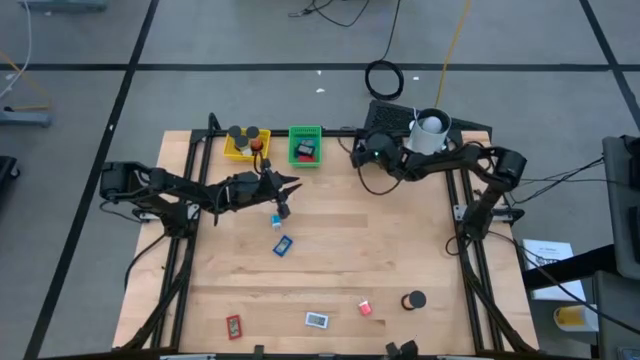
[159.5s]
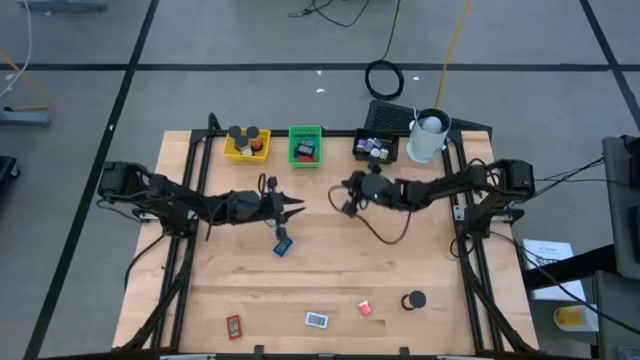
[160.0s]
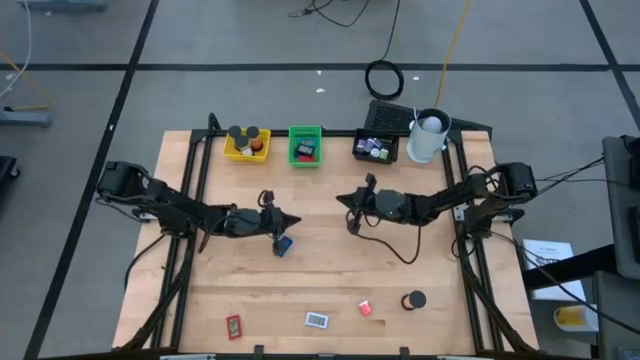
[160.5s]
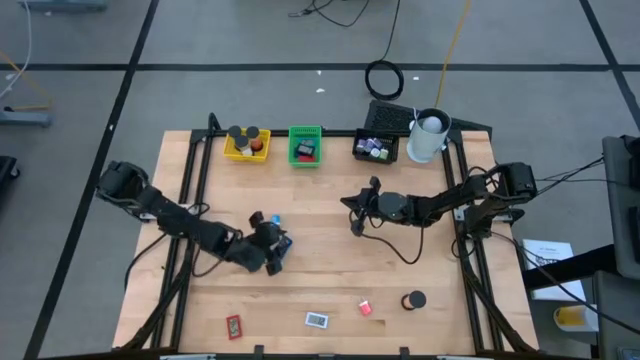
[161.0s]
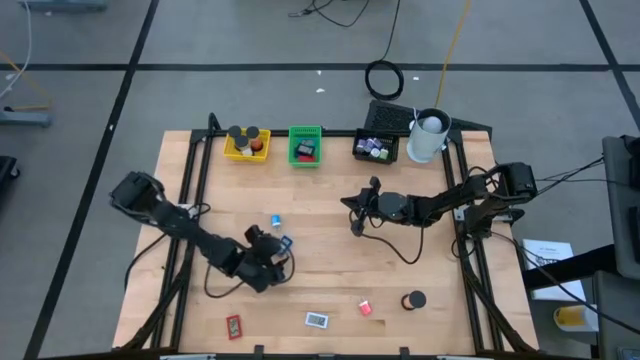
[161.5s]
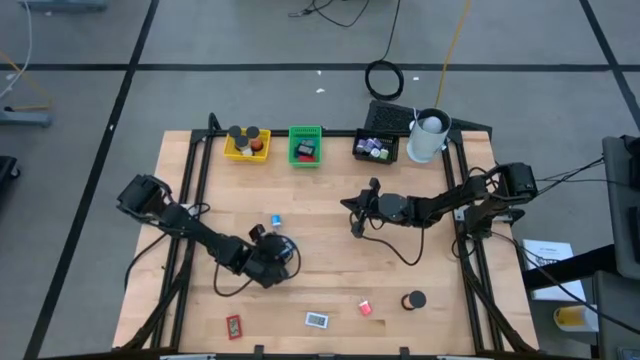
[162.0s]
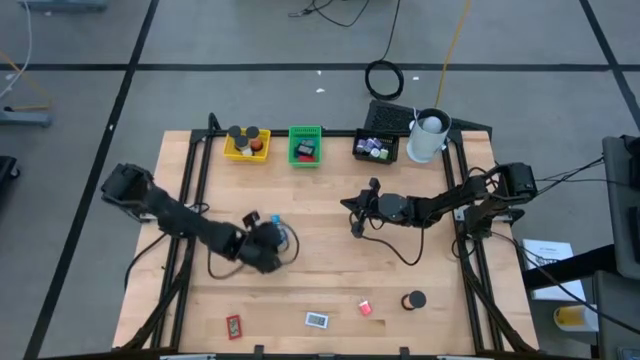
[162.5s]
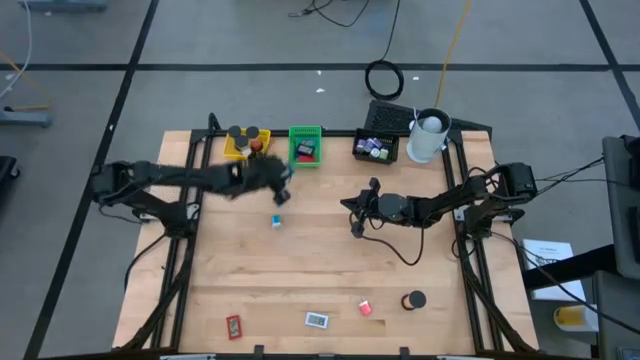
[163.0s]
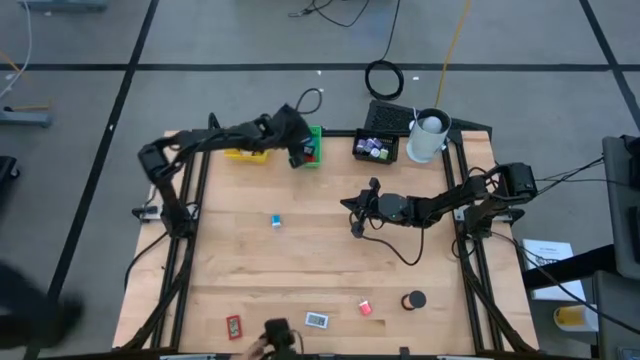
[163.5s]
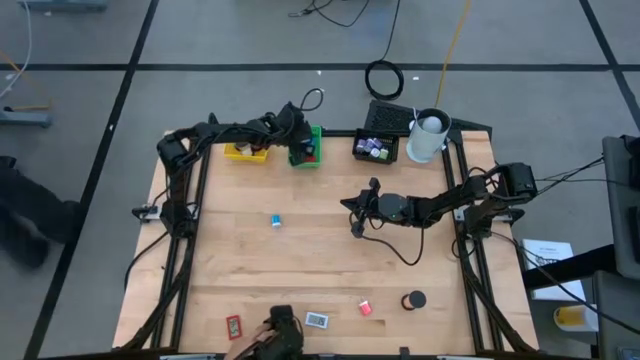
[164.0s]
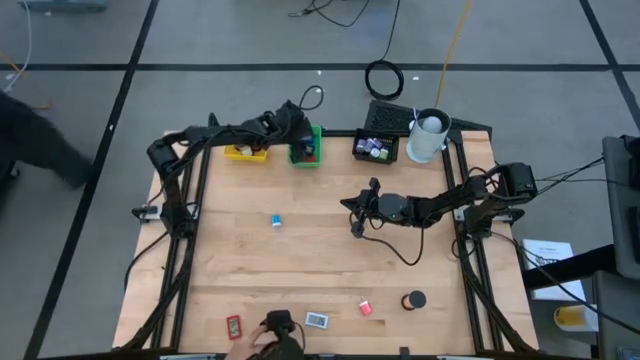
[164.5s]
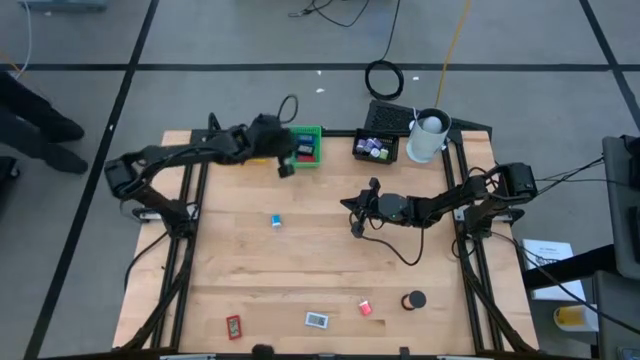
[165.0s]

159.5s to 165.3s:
Task: Pick & Place Office items
Put the blue digital timer in green bin

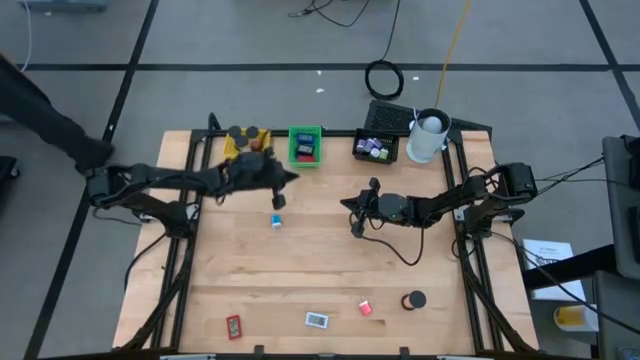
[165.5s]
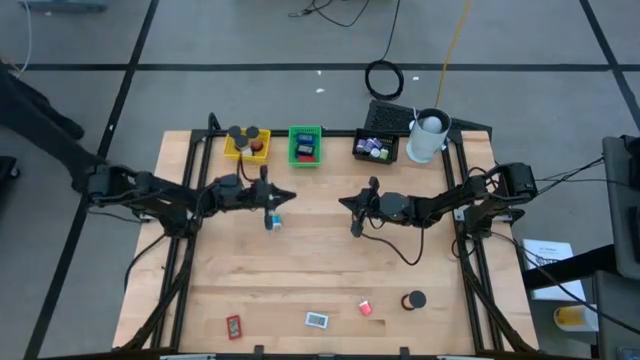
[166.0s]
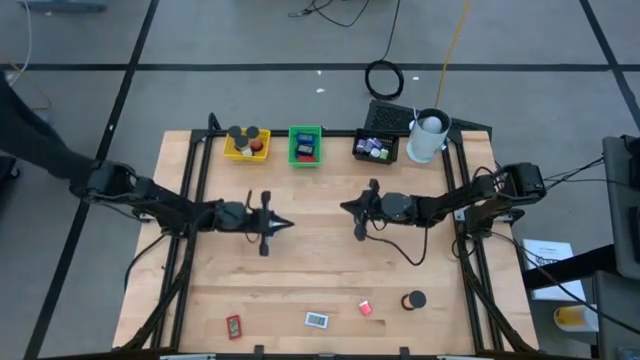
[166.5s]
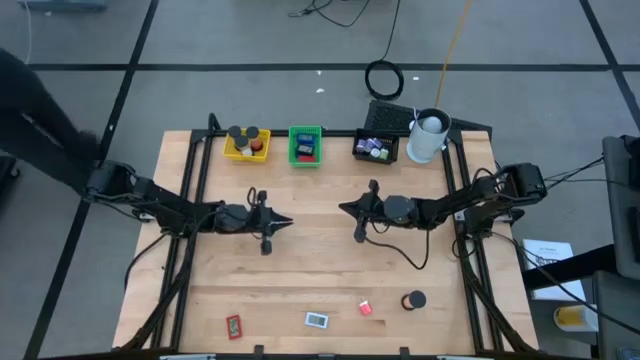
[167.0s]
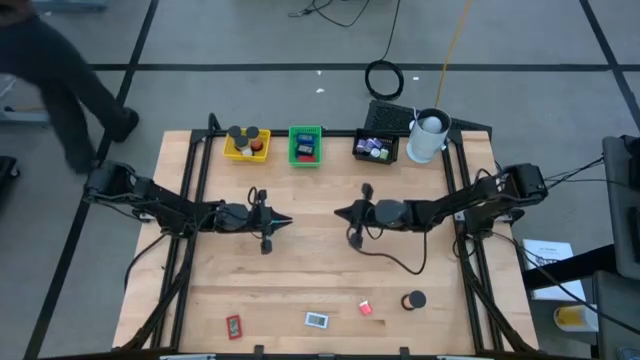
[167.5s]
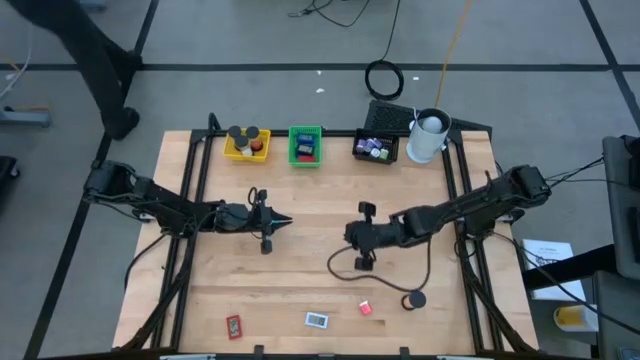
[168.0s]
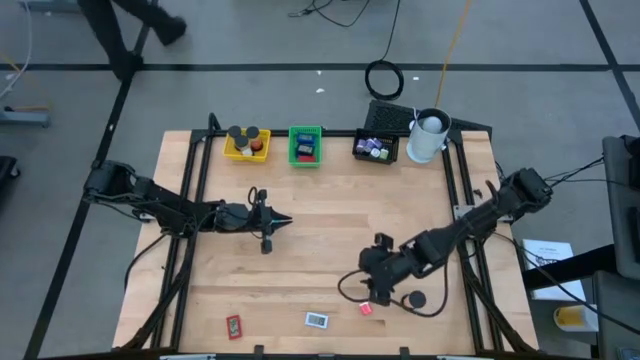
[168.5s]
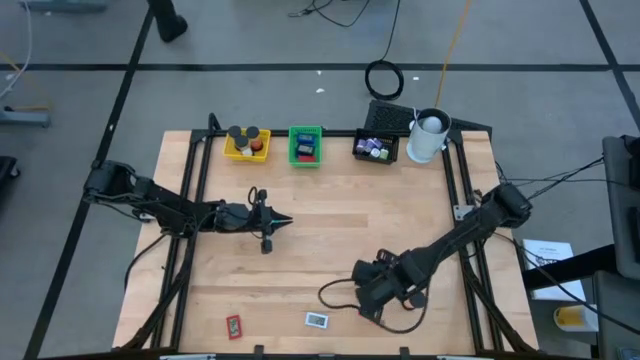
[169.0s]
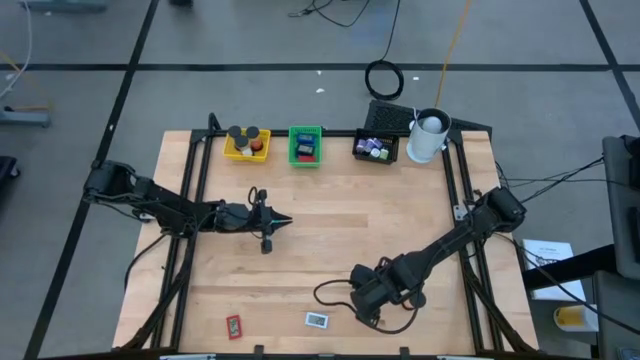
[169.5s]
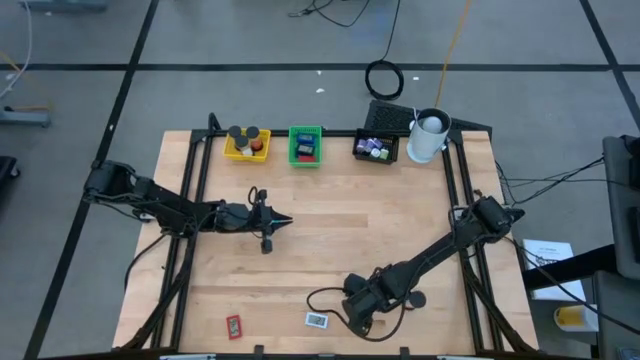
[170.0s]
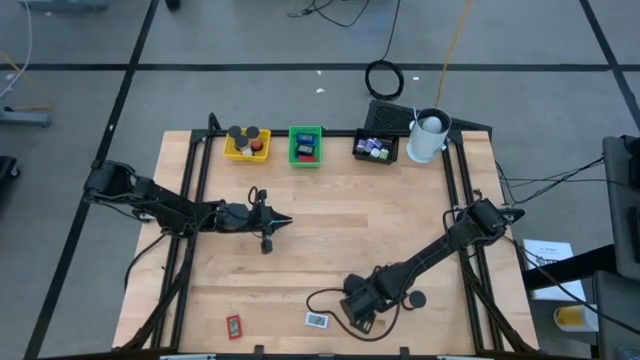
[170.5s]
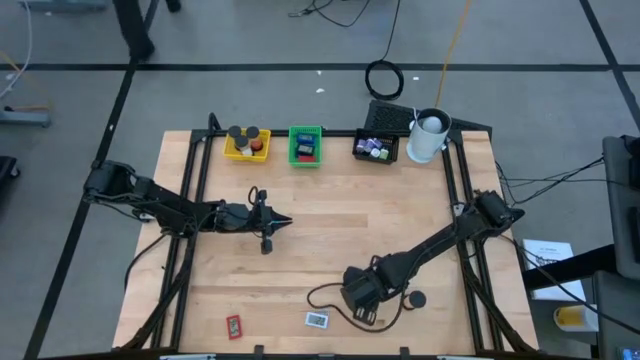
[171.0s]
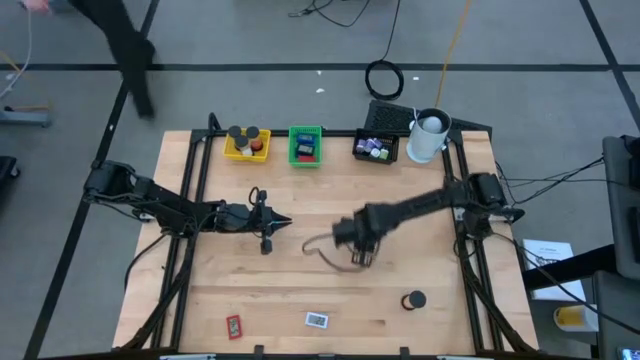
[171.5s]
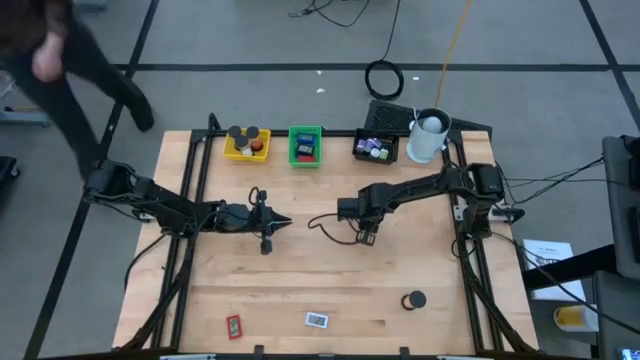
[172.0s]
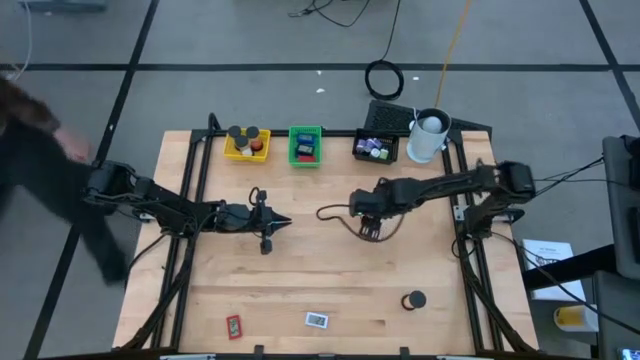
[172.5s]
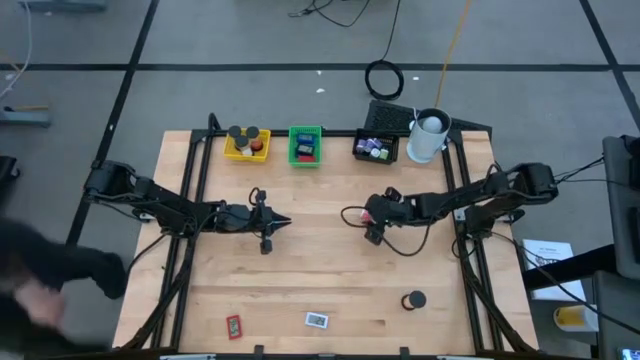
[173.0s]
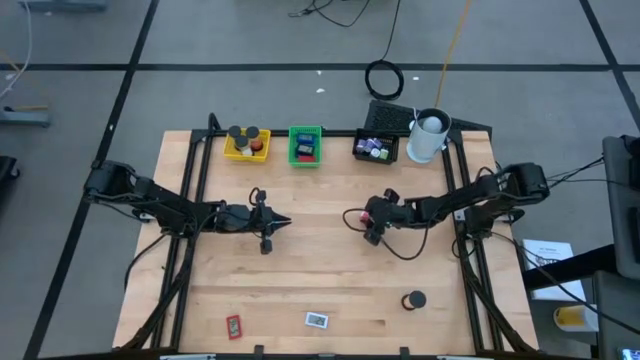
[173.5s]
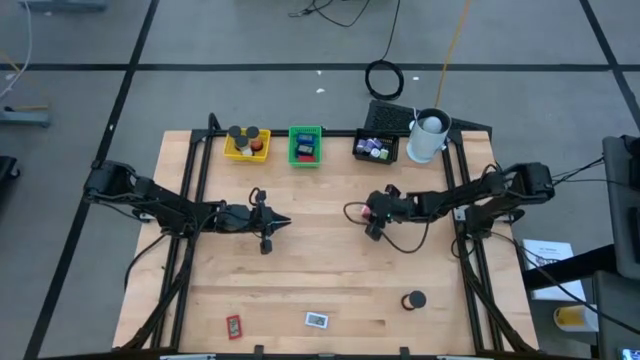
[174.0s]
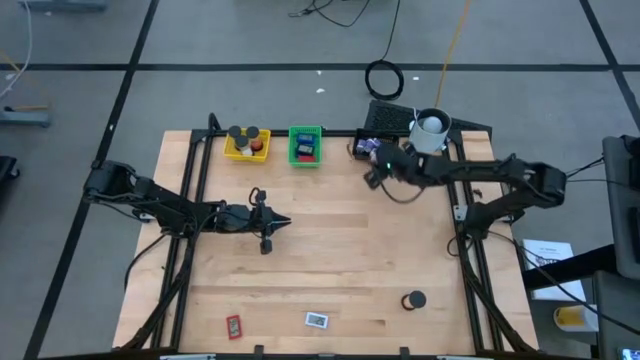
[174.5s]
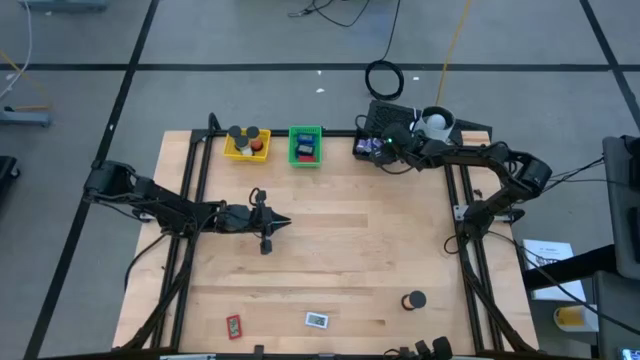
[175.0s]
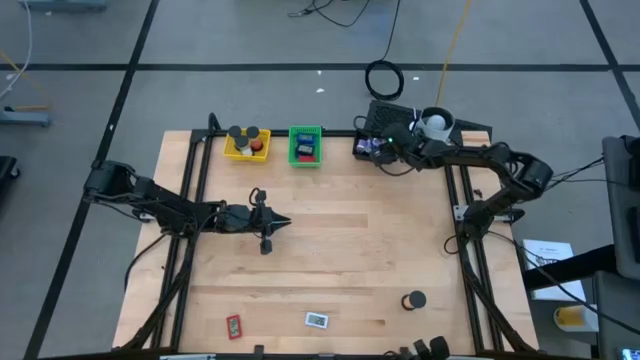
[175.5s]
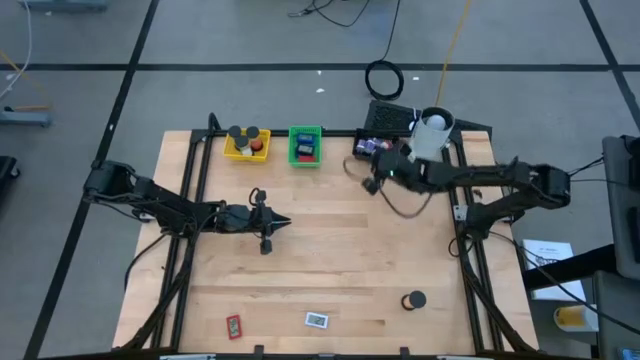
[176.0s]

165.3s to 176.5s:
Put the red charger adapter in the black bin

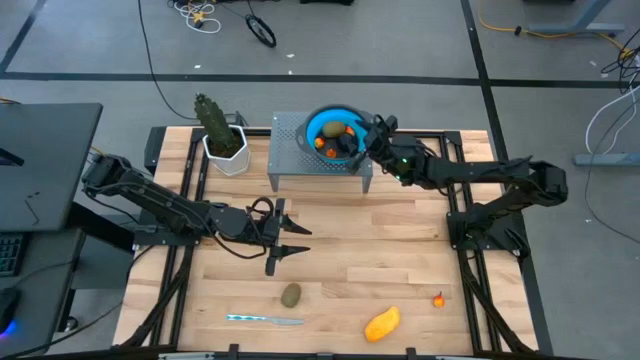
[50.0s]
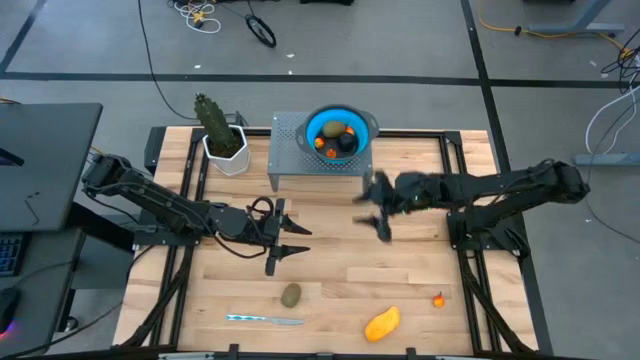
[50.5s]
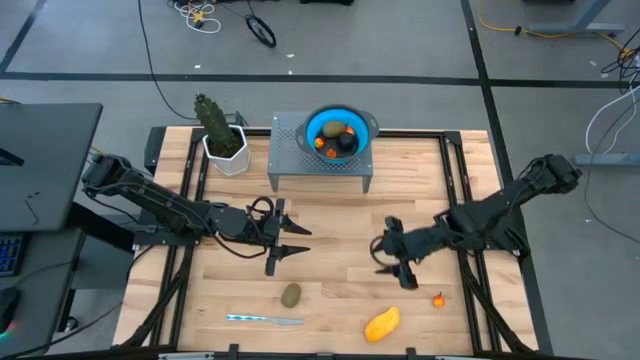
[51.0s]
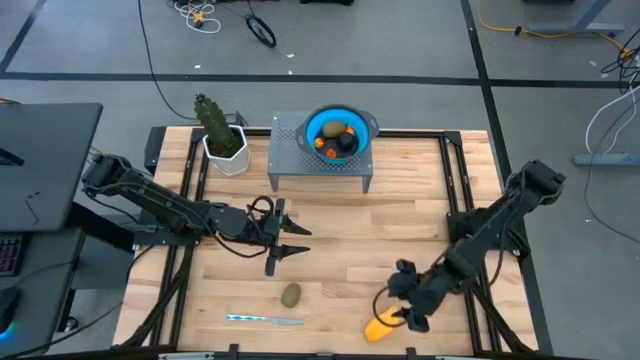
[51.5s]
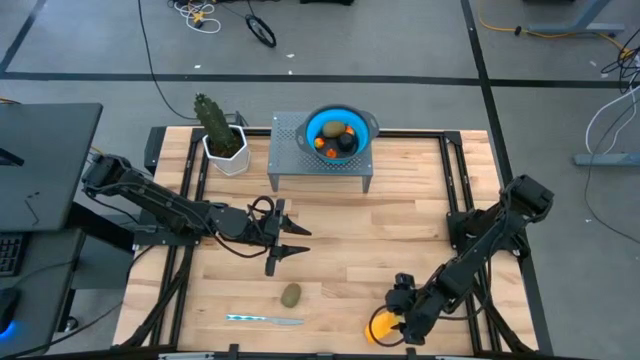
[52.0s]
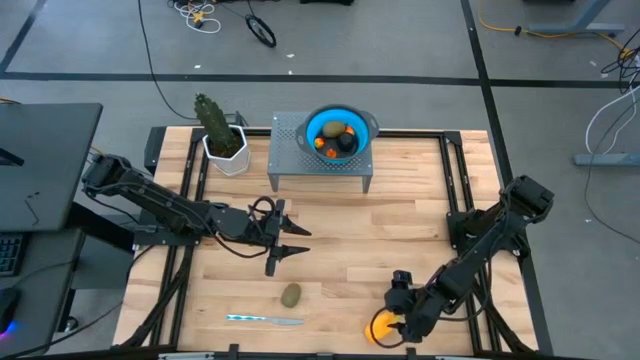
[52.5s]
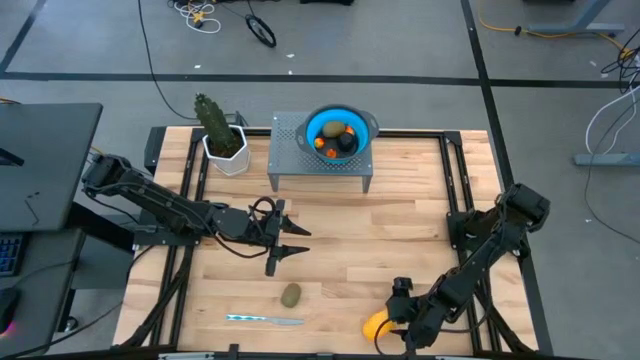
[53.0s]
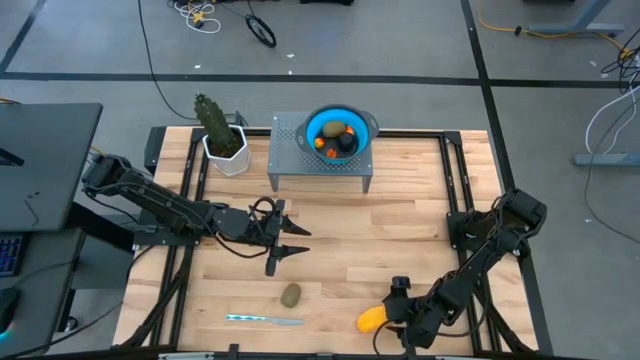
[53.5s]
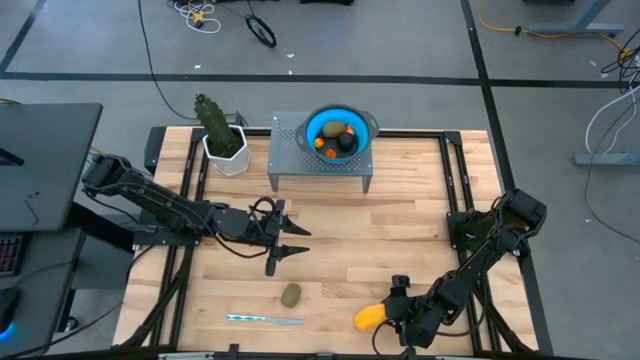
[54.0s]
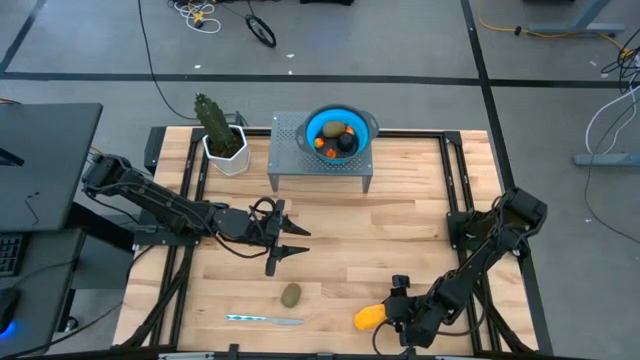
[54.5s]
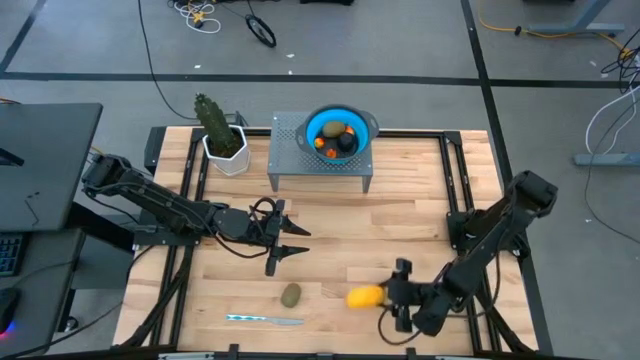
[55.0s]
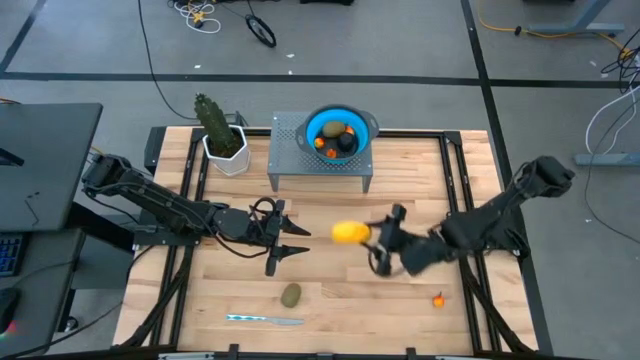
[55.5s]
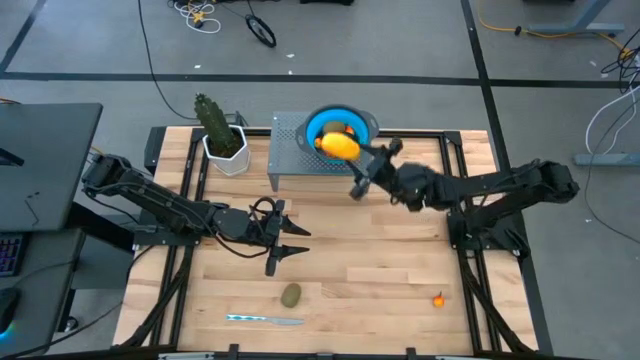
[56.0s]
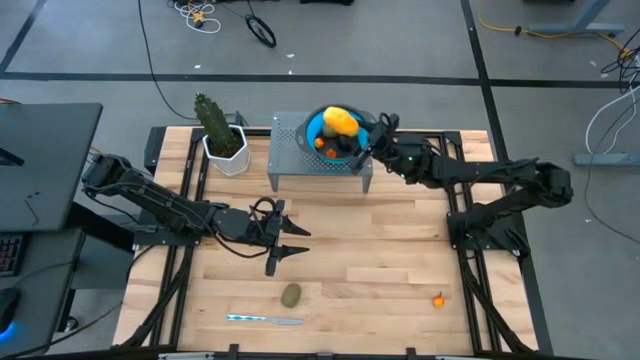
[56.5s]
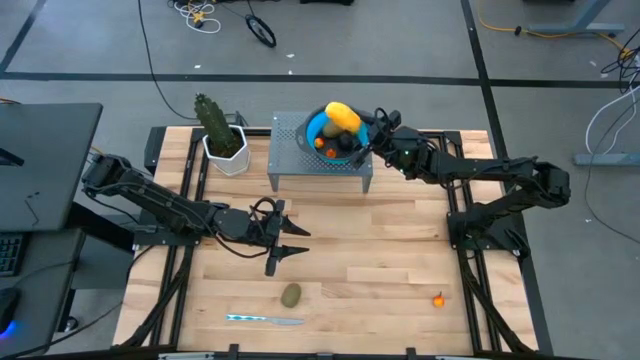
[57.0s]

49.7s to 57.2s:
Task: Pick & Place Fruit
Put the yellow mango in the blue strainer bowl on the shelf
